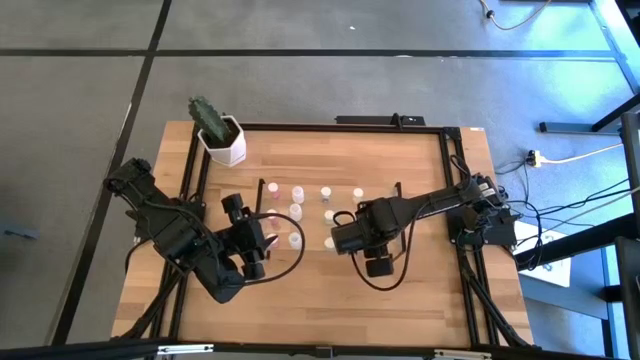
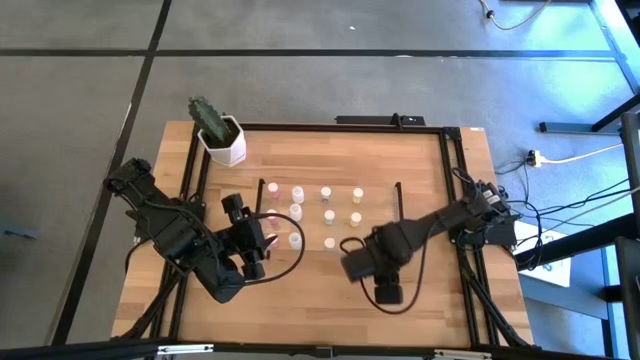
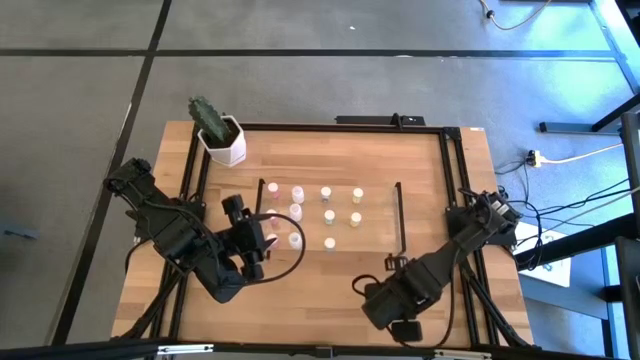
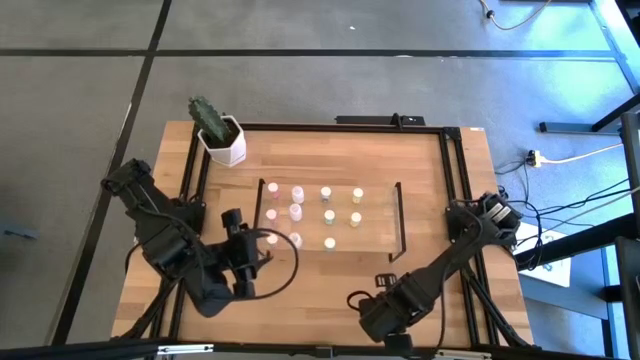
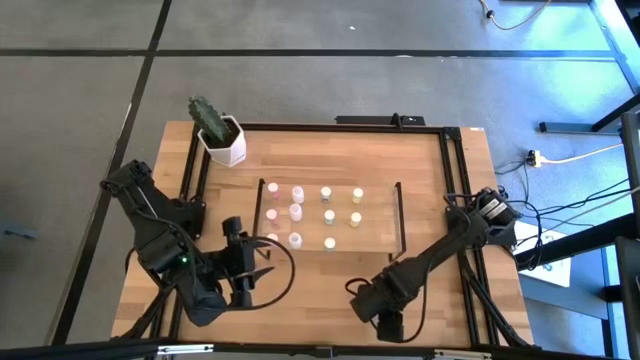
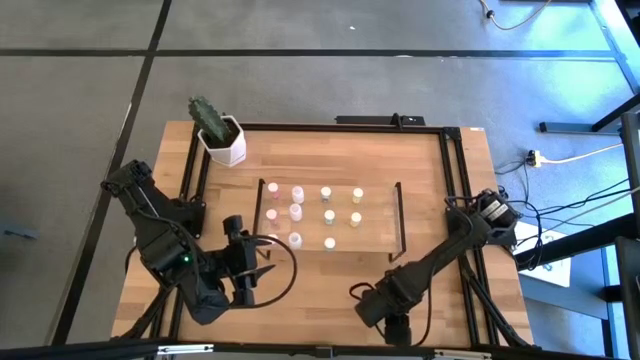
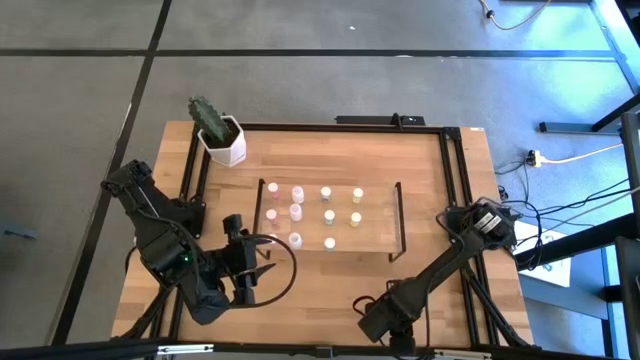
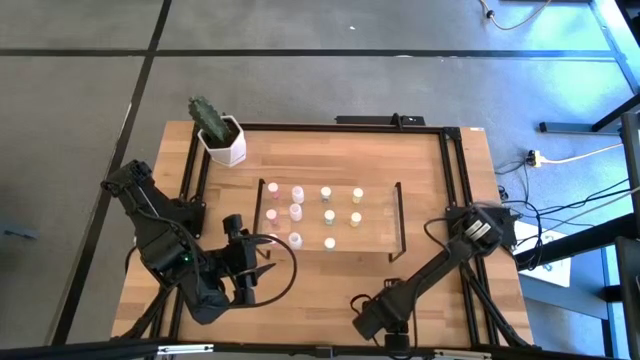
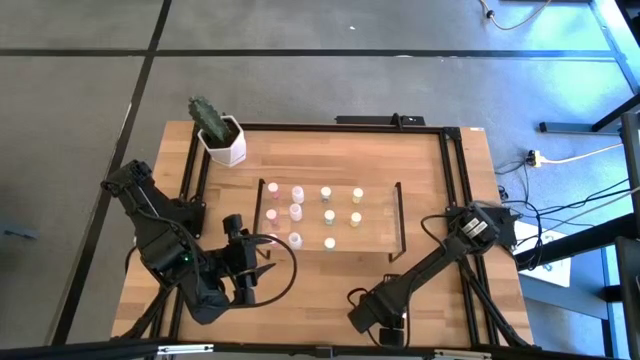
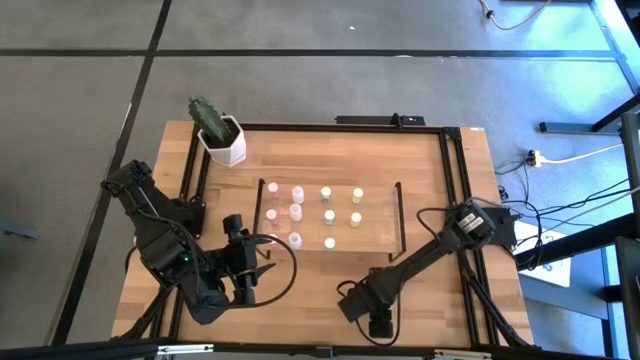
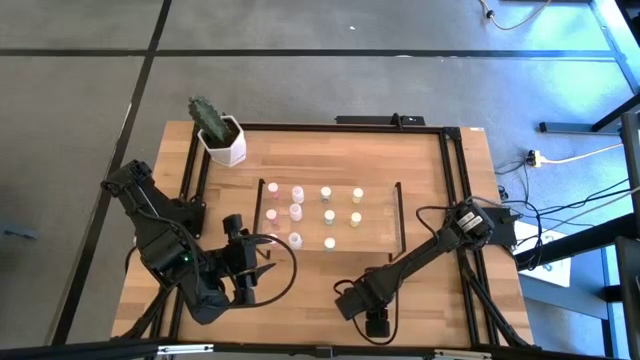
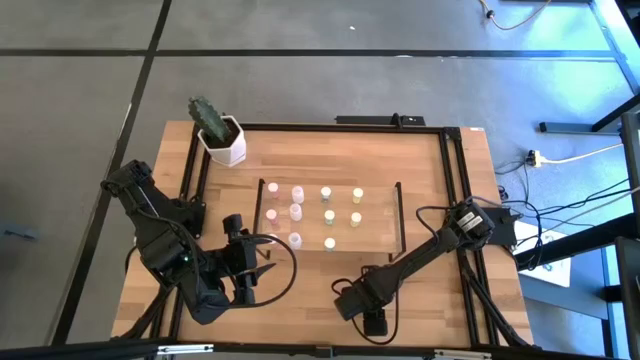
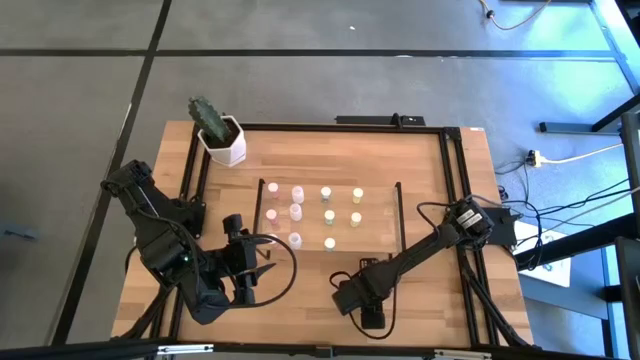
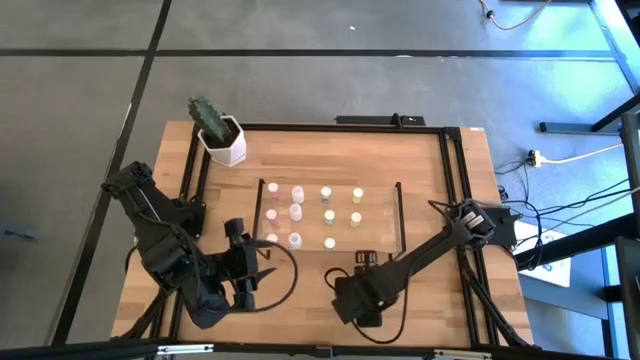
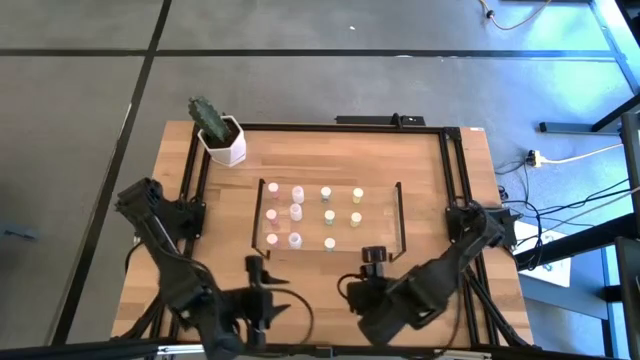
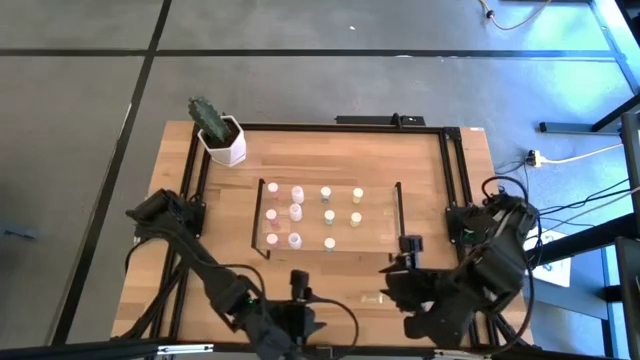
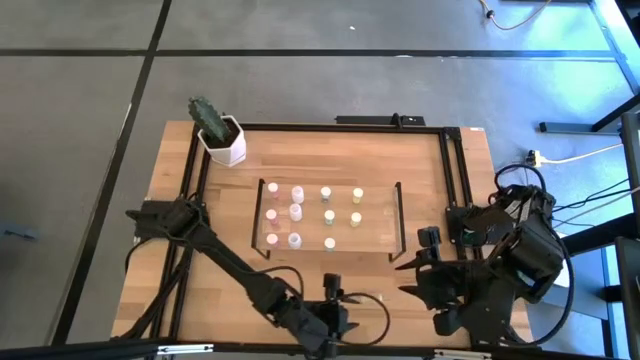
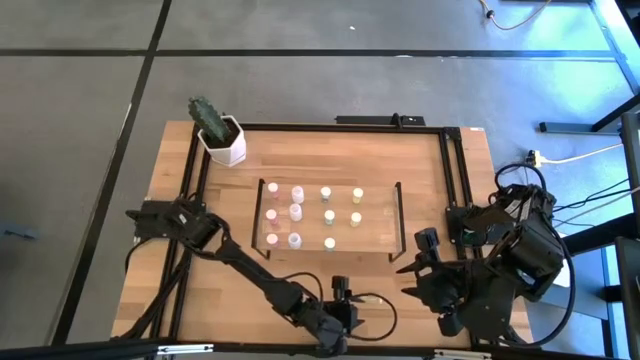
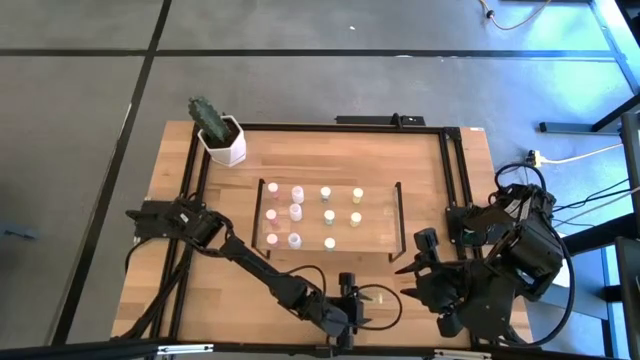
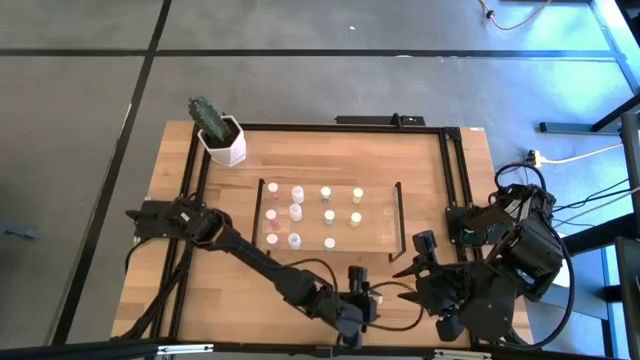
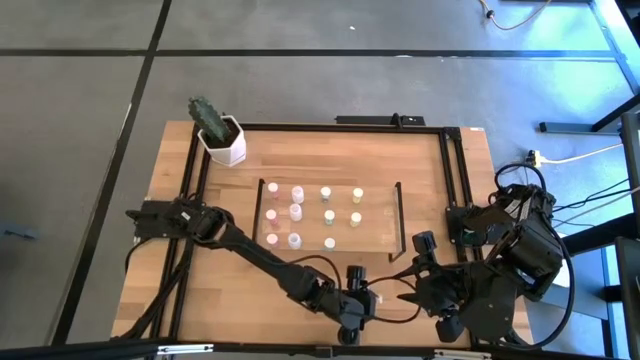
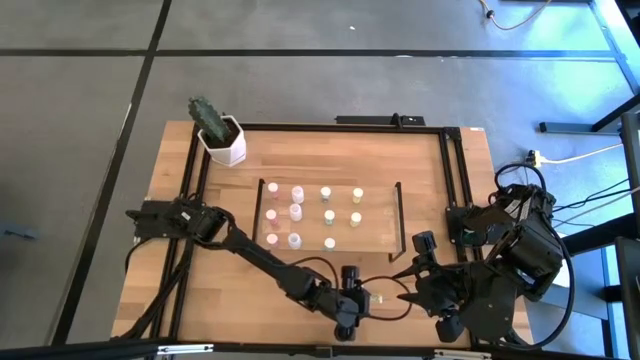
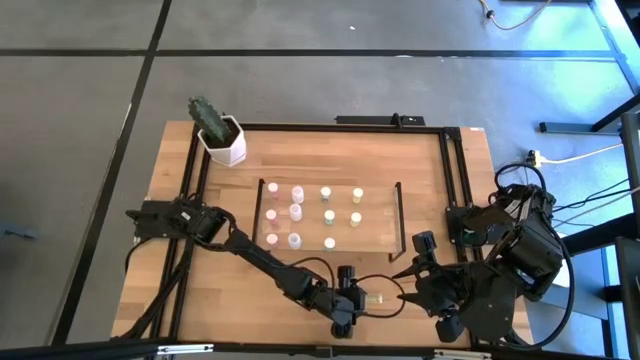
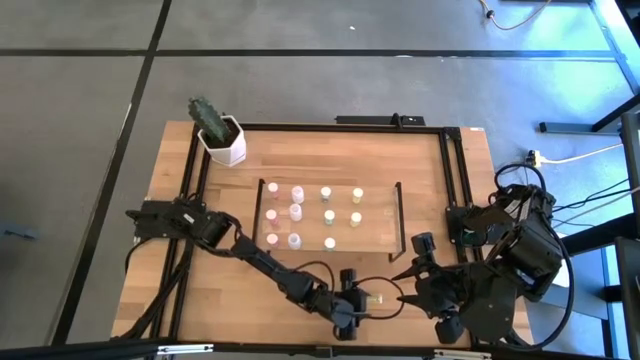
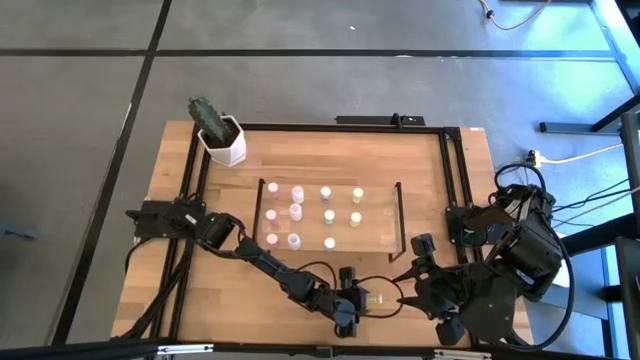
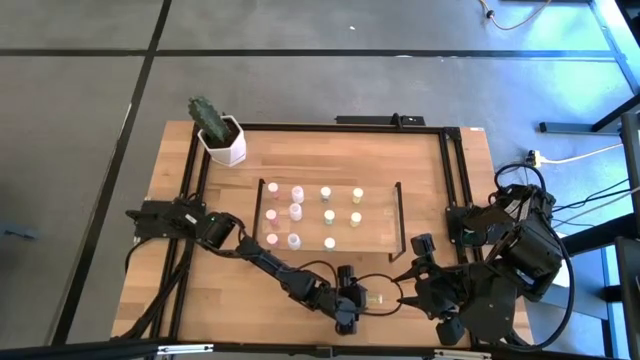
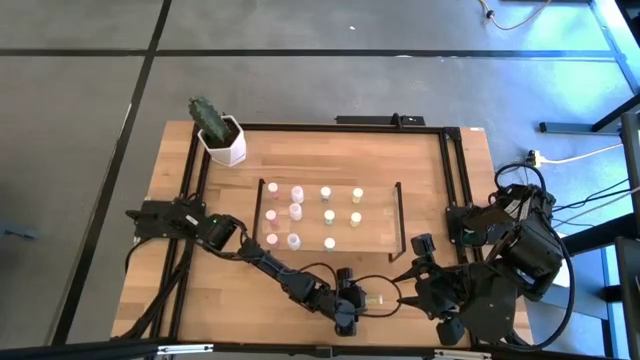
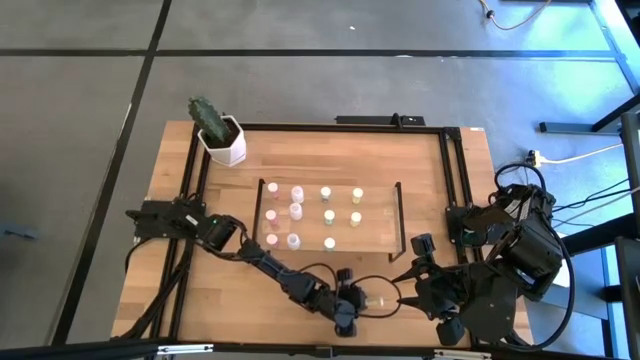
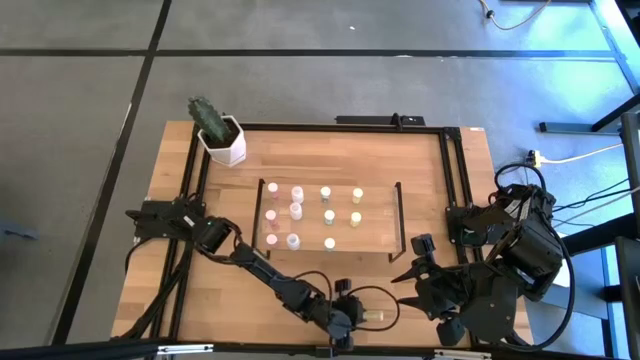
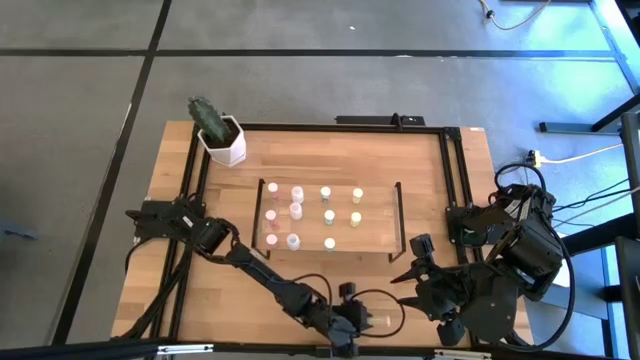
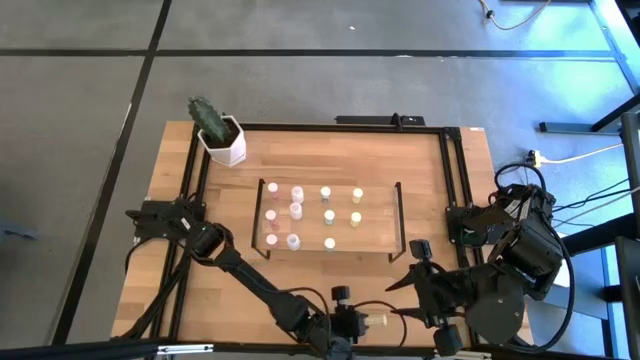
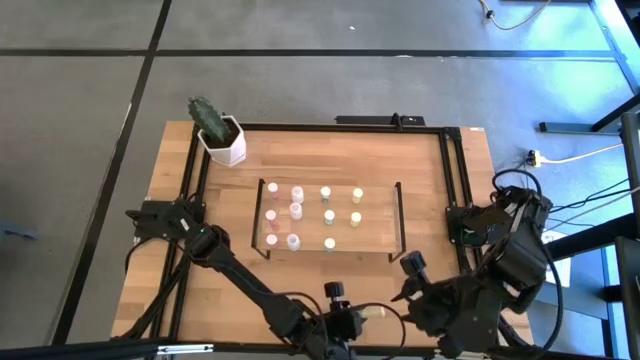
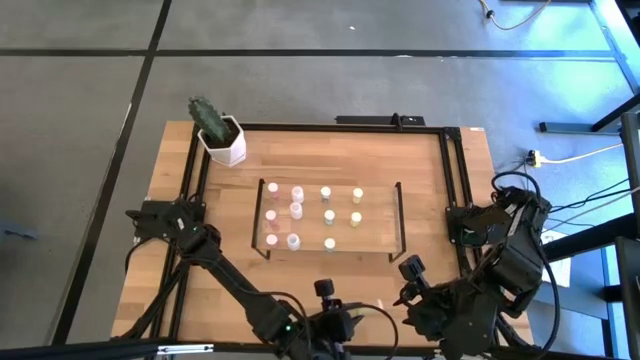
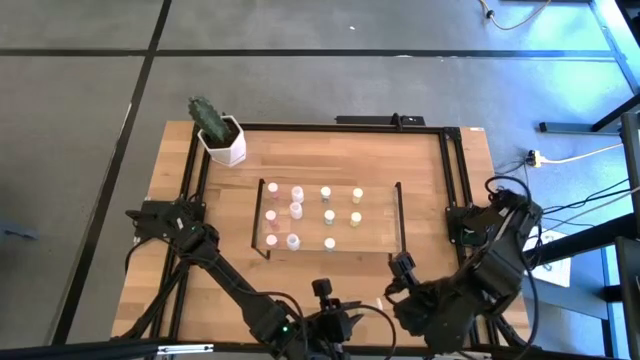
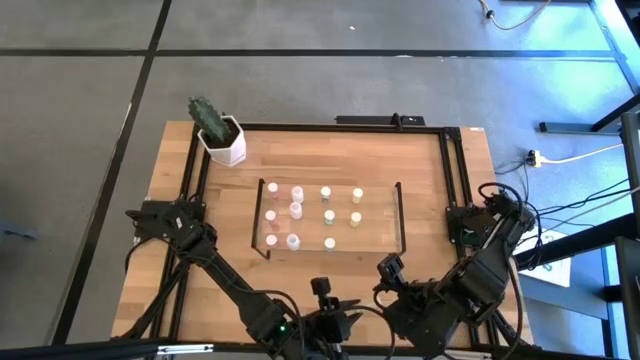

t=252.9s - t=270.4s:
Task: Pick and place medicine bottles onto shelf by color
Put the yellow pill bottle on the shelf aligned with the other yellow pill bottles

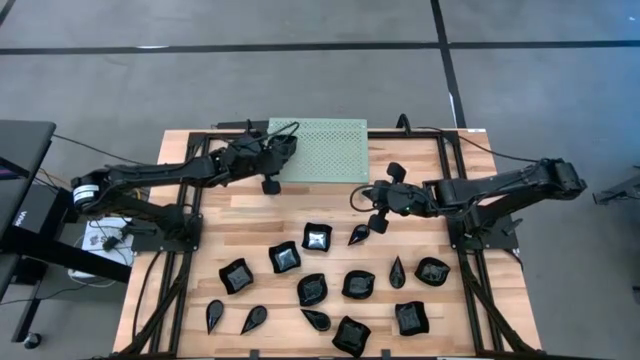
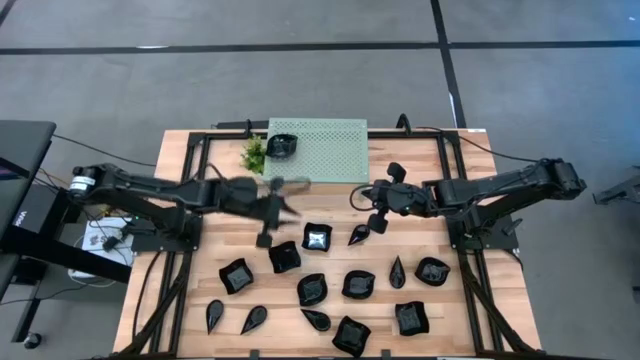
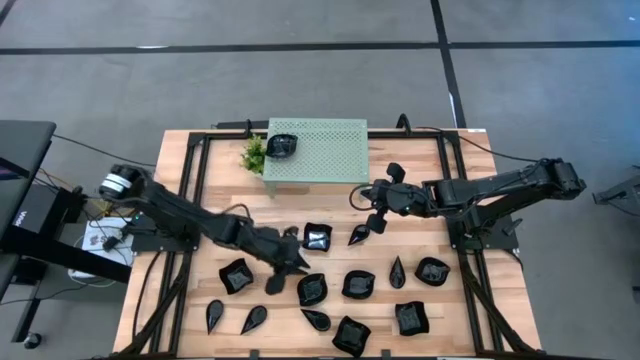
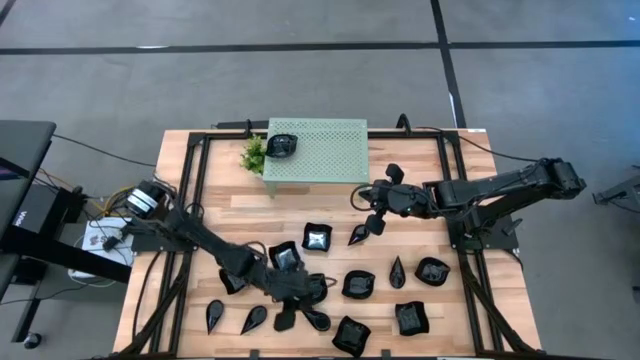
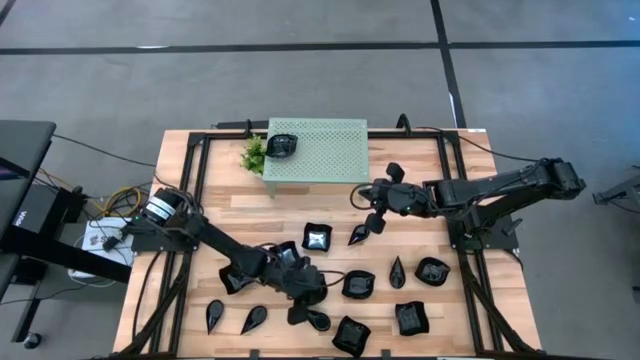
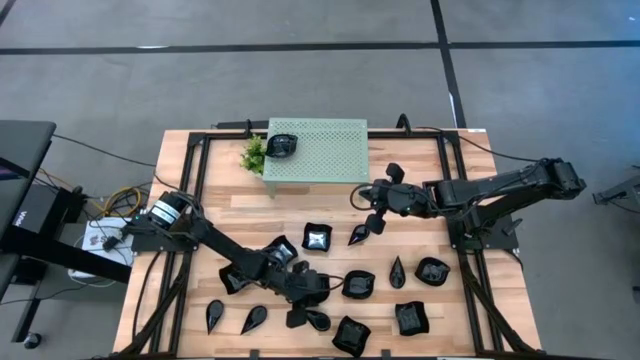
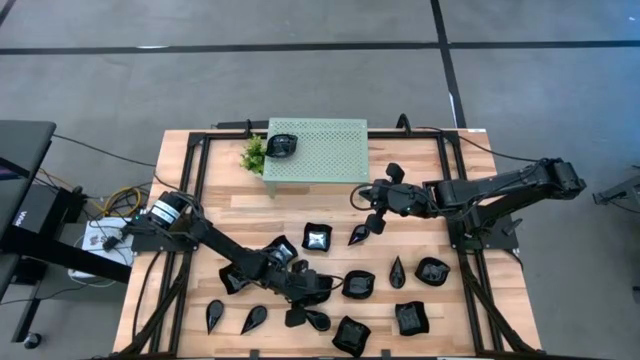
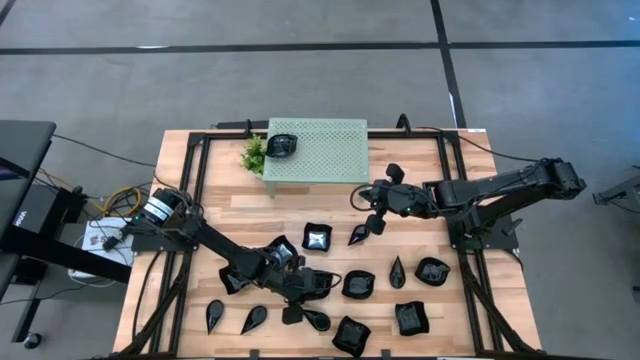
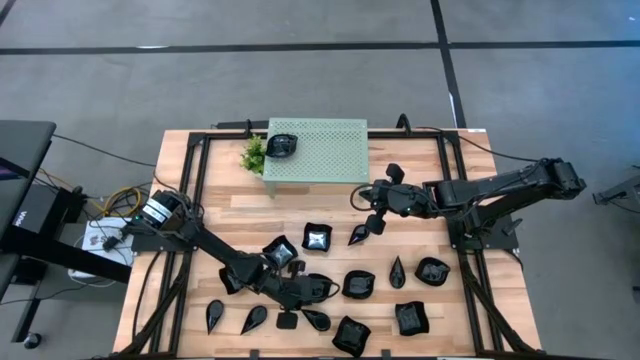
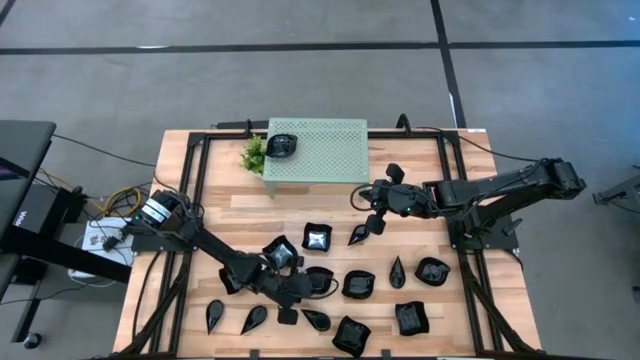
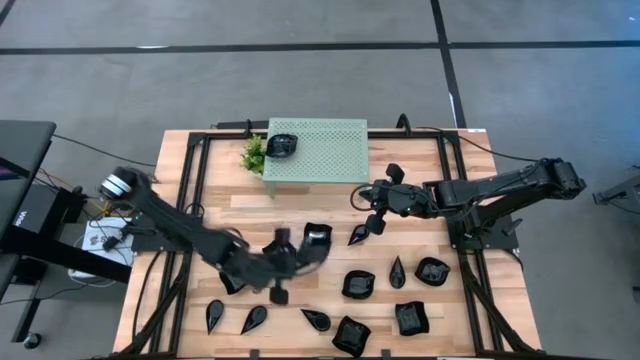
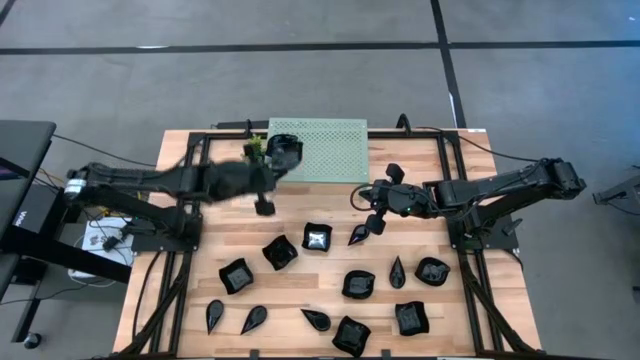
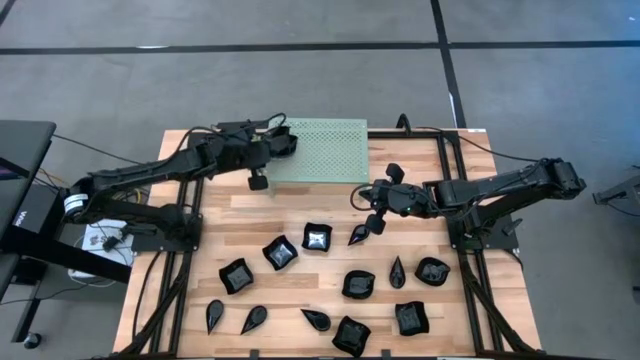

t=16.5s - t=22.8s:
Task: Pick & Place Mini shaped plates
Stack the leaf-shaped plate on top of the other leaf-shaped plates on the shelf
